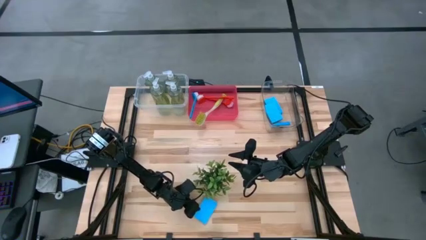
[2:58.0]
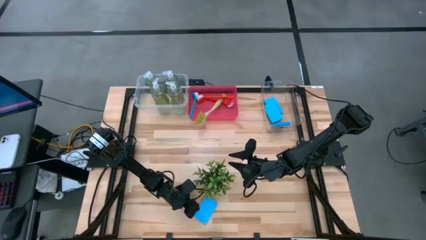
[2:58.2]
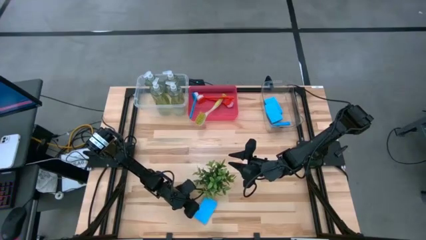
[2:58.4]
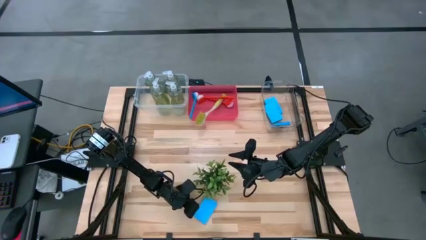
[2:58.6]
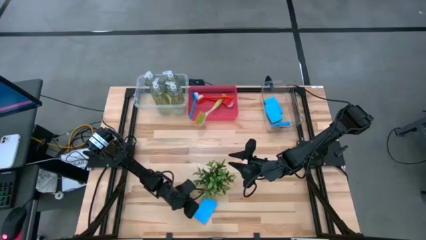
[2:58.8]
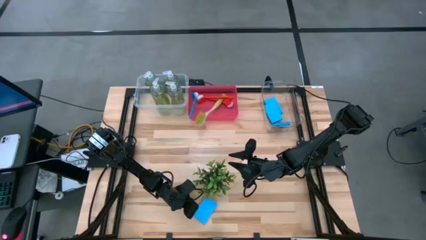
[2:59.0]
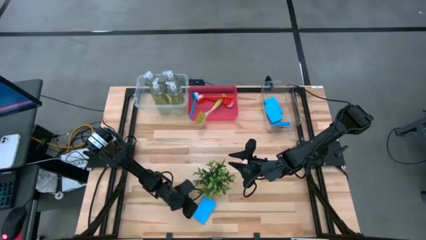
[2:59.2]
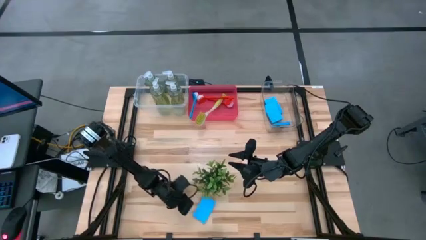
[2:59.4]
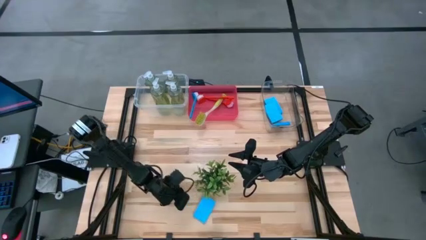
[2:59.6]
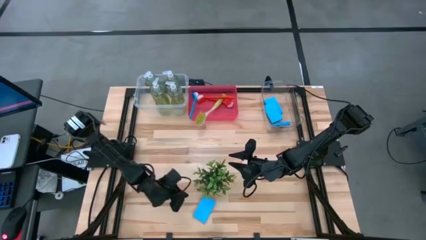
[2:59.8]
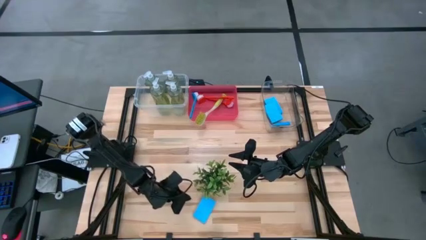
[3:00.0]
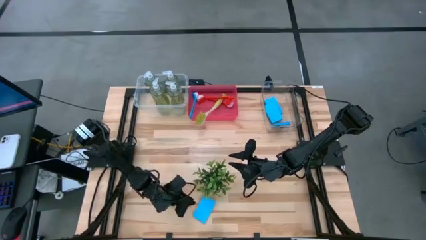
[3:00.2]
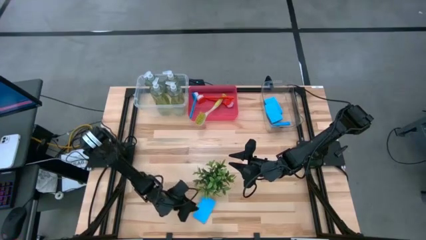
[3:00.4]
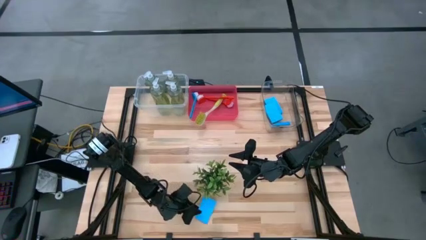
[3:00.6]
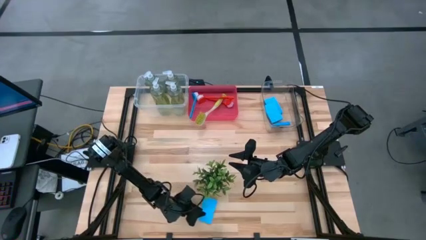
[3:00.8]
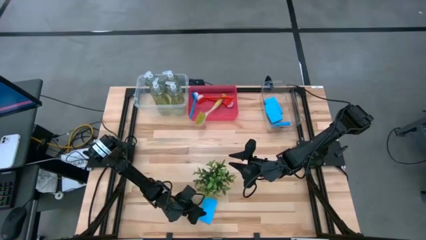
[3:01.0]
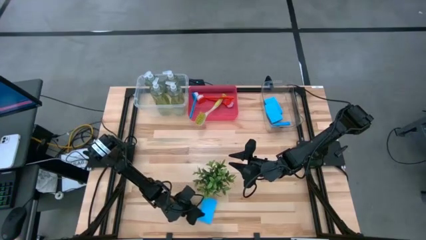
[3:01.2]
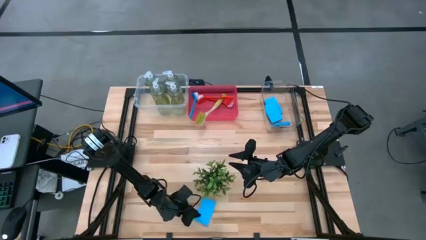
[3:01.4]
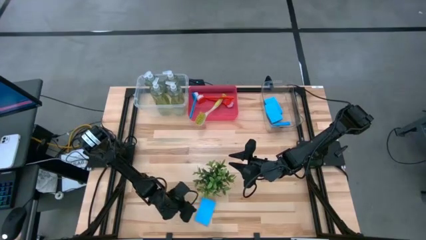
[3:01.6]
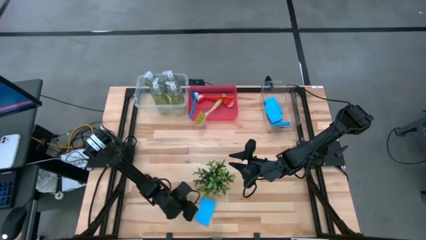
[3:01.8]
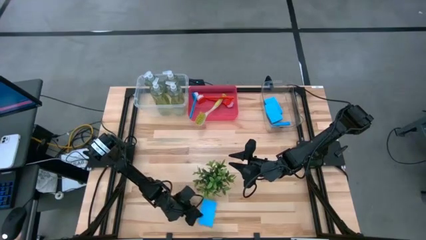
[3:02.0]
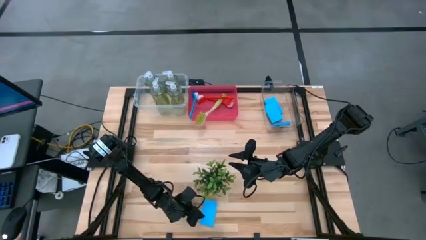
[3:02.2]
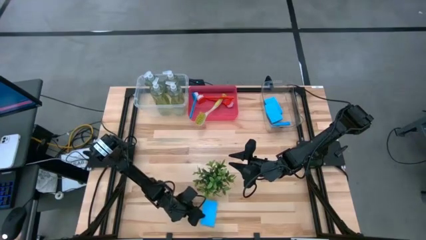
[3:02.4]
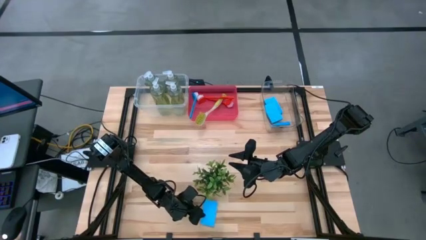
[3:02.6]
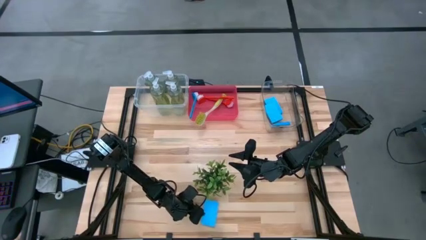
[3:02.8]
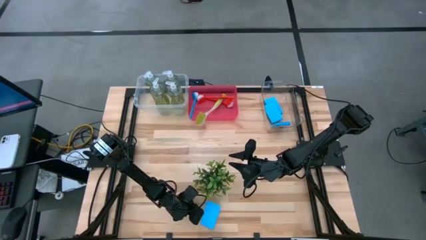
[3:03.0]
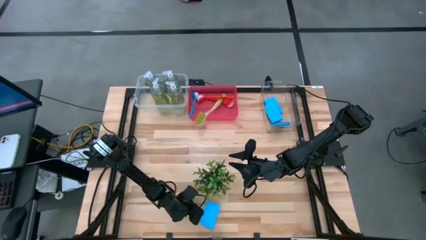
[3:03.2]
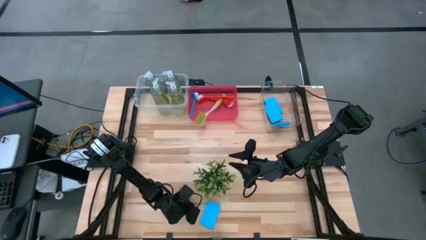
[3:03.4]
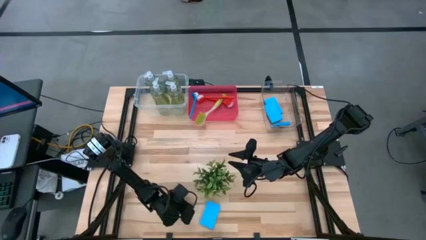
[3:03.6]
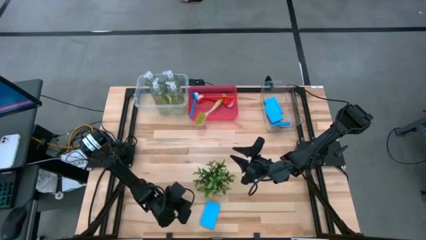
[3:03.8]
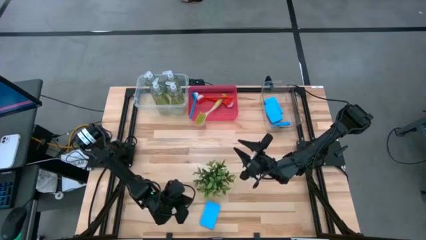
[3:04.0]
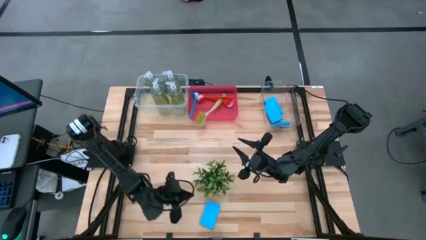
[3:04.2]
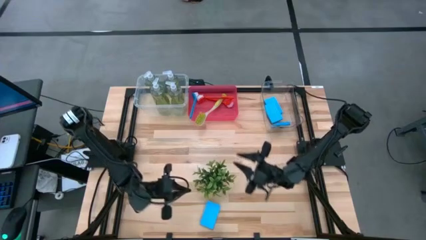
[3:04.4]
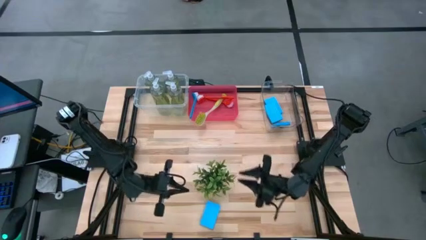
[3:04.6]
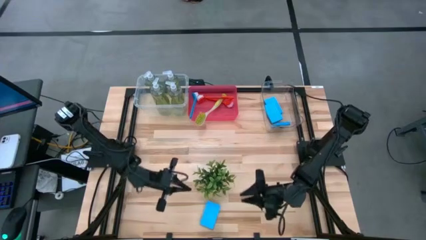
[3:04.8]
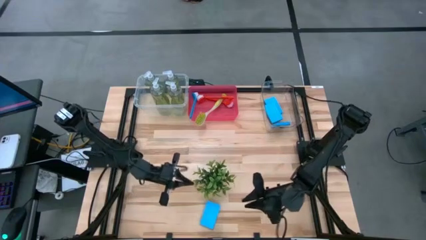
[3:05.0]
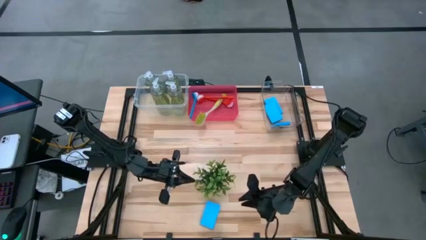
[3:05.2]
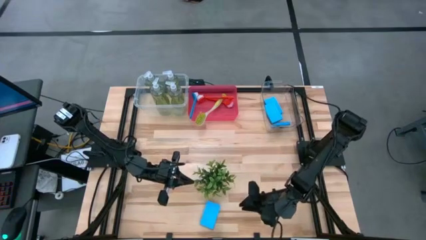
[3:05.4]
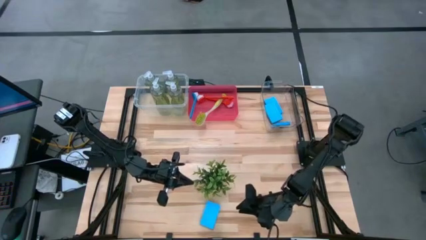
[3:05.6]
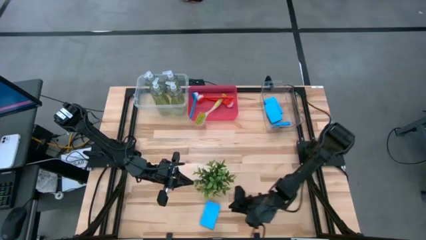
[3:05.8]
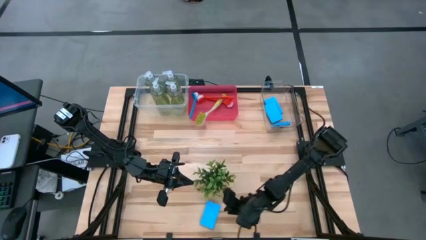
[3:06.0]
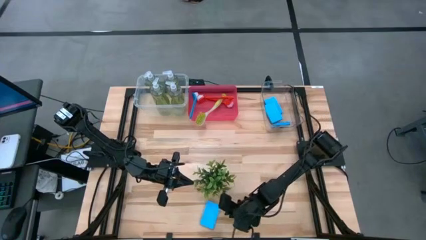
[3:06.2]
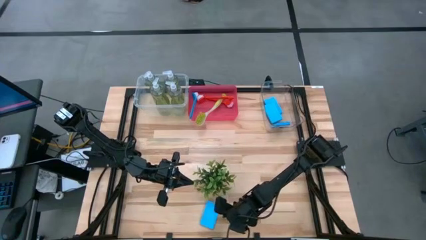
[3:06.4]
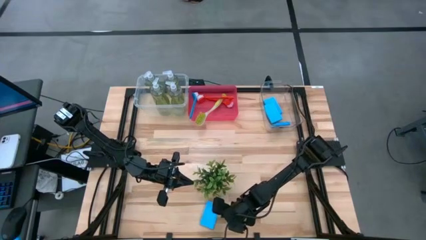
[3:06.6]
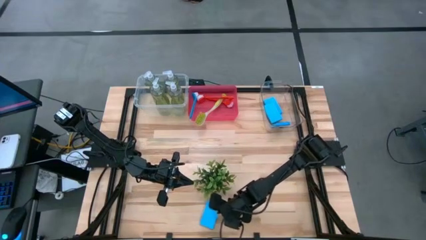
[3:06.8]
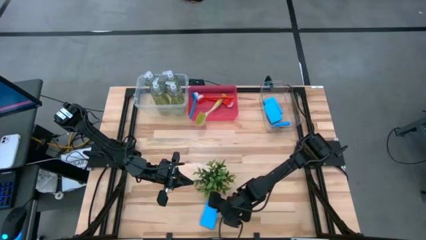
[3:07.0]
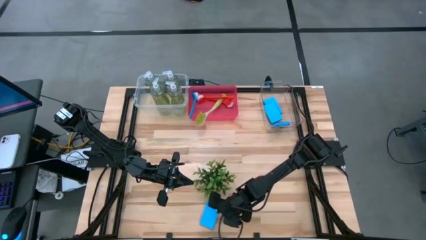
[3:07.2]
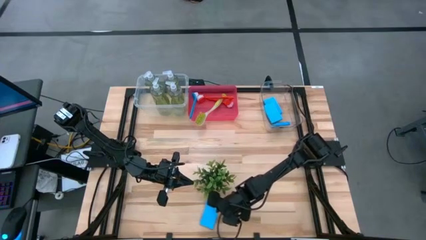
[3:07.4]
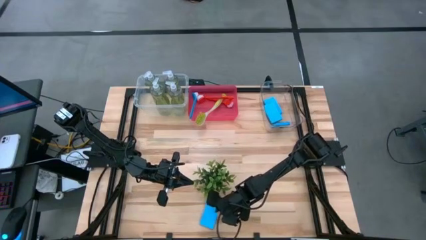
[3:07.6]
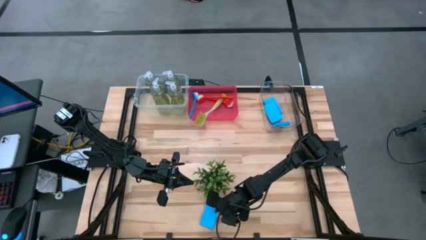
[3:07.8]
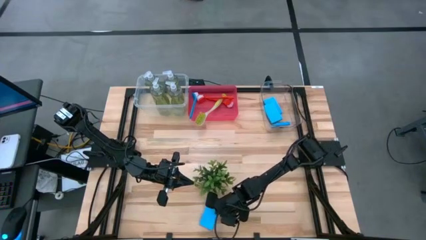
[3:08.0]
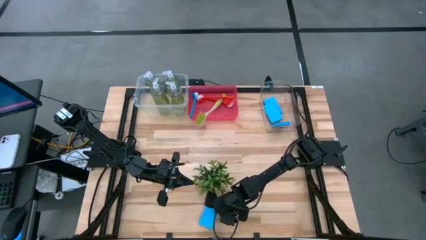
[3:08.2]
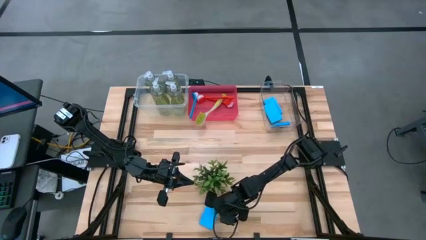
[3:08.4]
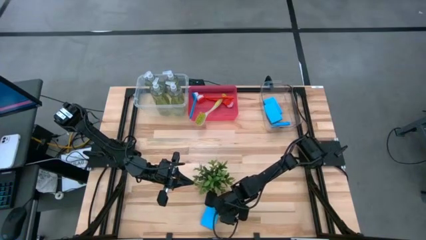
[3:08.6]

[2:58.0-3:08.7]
Task: Pick & Place Kitchen Sink Supplies
Put the blue sponge into the transparent bin

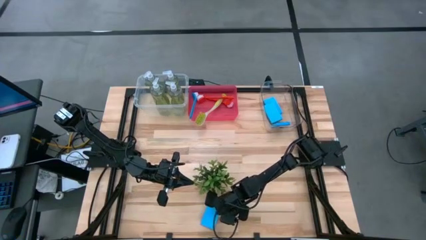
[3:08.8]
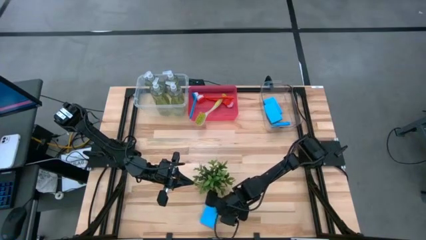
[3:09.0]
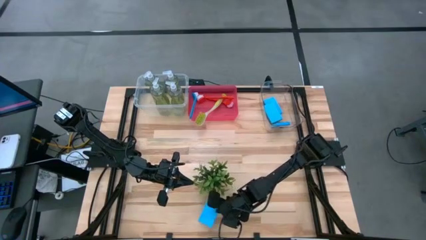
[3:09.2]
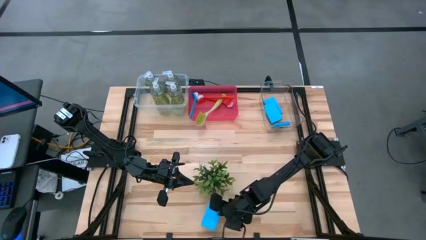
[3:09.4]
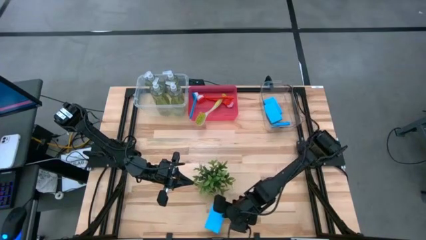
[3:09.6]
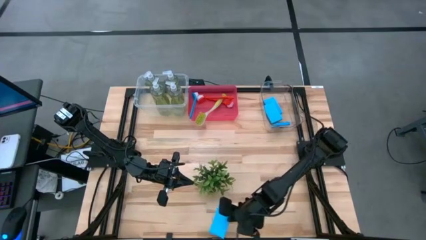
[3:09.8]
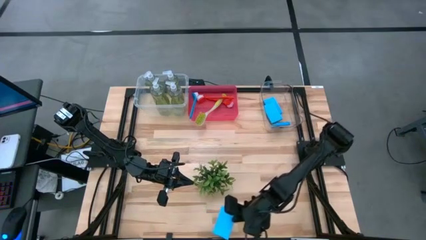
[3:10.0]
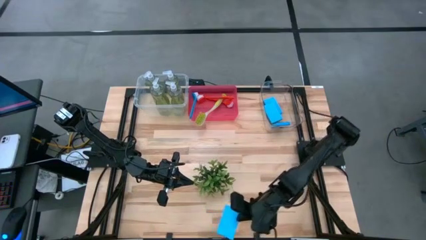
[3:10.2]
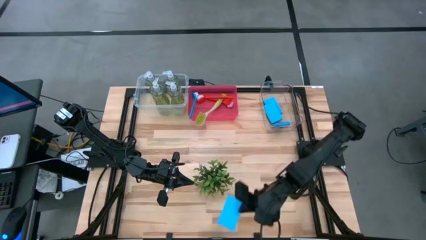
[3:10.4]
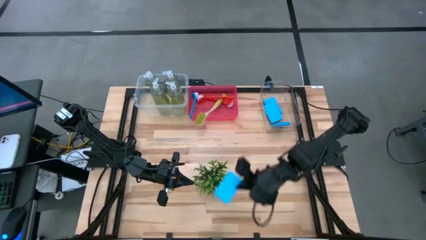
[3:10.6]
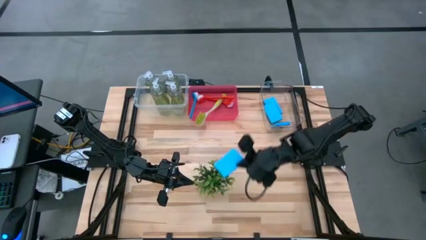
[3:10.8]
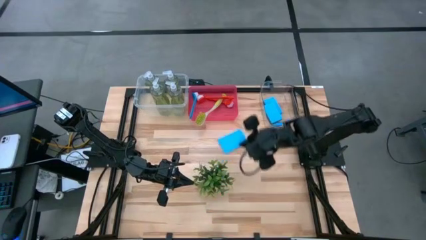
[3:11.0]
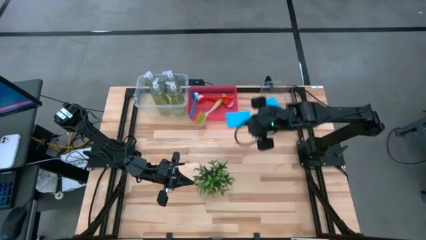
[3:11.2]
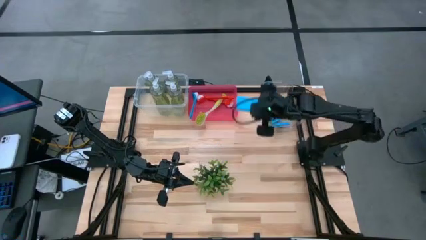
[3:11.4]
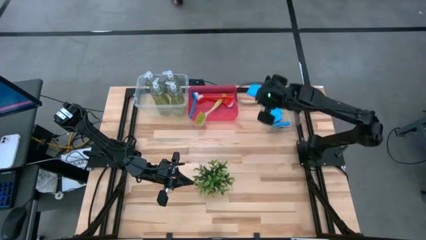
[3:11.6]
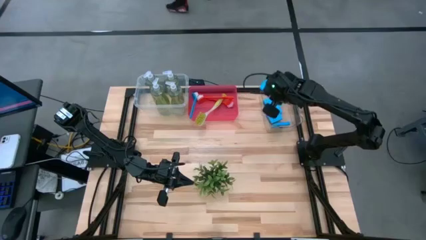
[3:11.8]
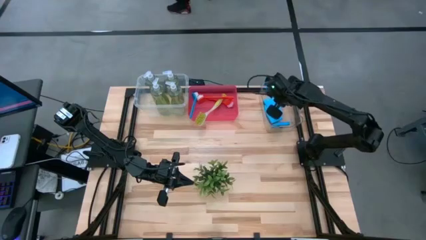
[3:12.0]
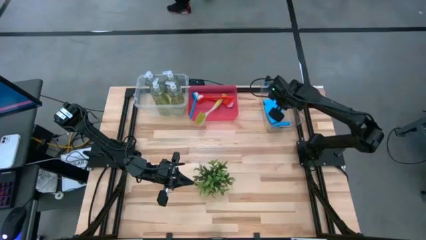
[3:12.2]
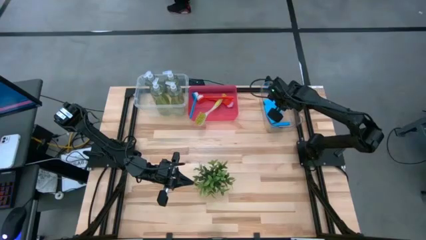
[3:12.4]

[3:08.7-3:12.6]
Put the blue sponge into the transparent bin

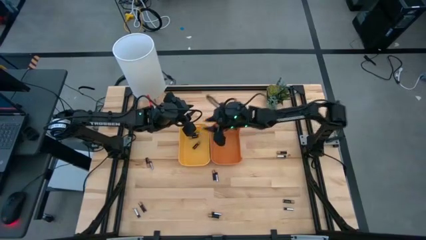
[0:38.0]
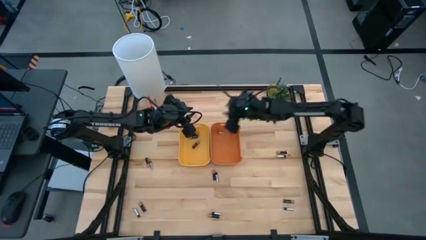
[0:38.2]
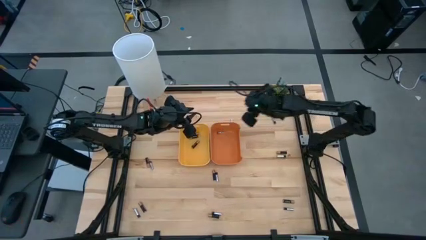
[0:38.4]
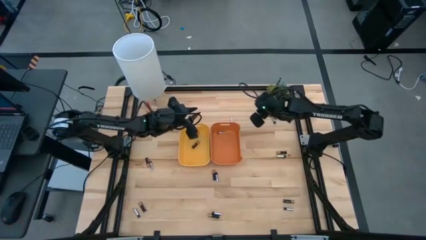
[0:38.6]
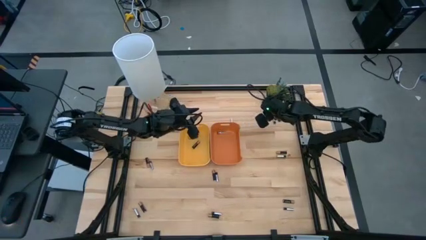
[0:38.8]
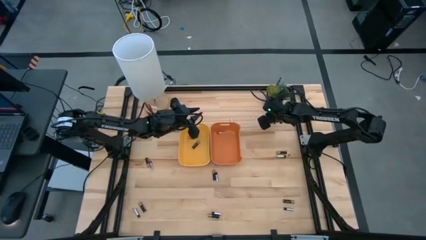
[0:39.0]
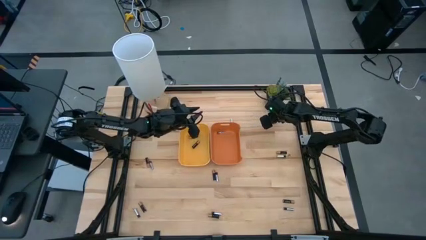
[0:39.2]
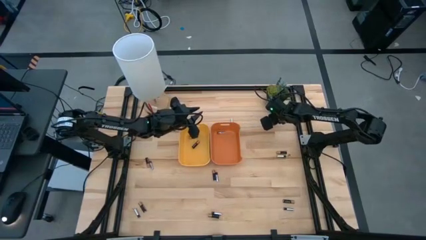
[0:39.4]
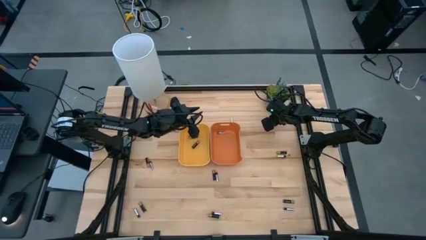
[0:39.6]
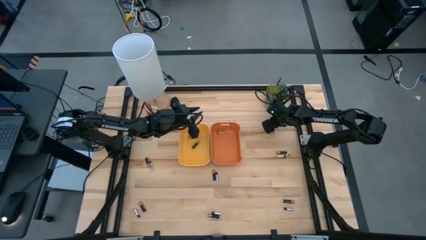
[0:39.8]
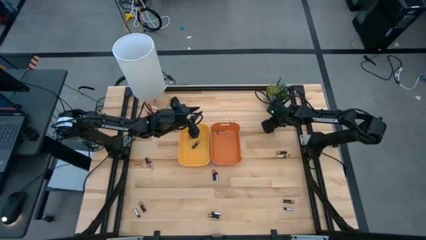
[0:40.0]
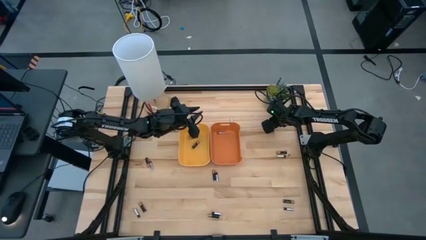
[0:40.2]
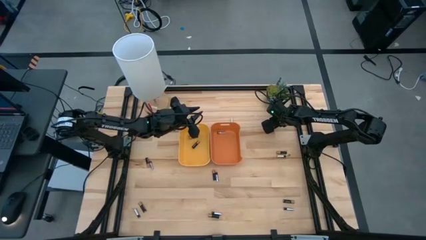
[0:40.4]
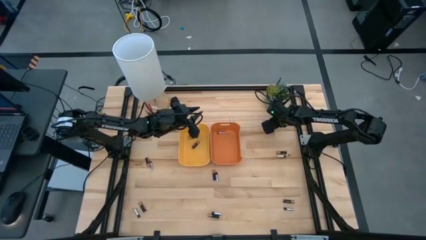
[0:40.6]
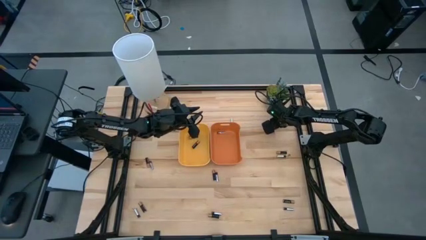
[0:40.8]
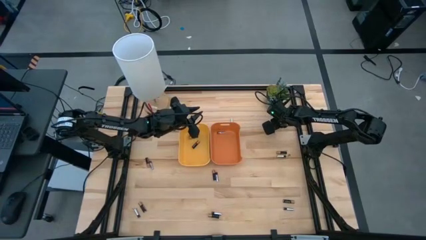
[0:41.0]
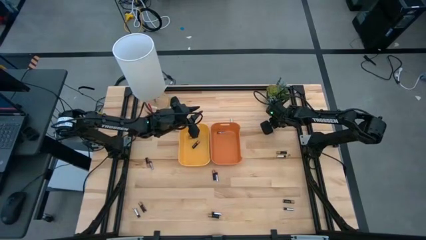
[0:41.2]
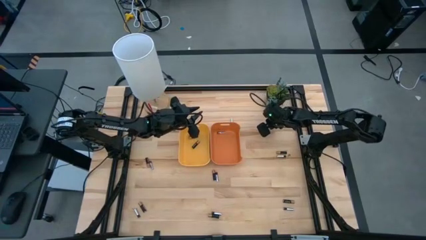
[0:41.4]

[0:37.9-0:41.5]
Task: Sort batteries
Put the top right silver battery into the orange bin
